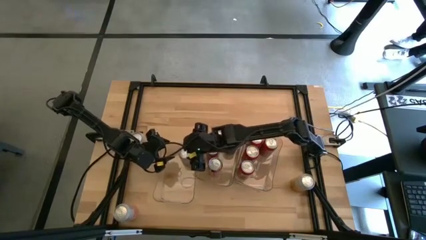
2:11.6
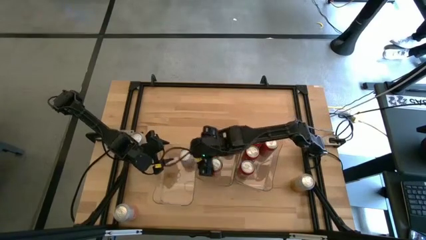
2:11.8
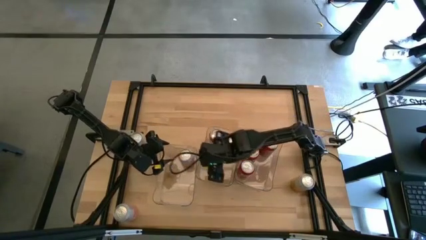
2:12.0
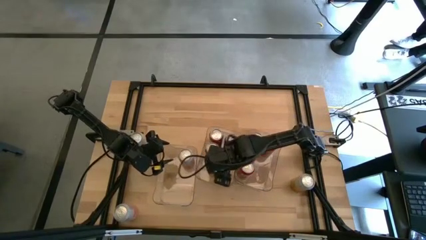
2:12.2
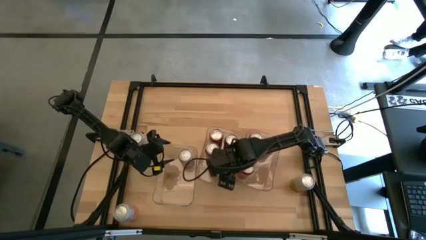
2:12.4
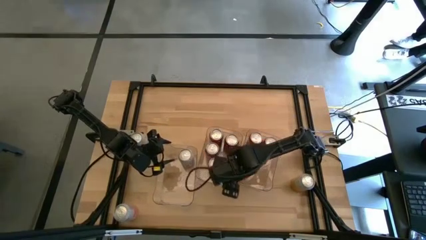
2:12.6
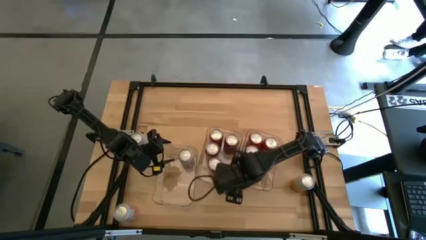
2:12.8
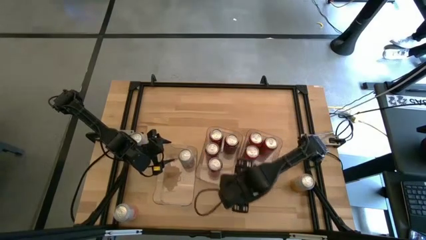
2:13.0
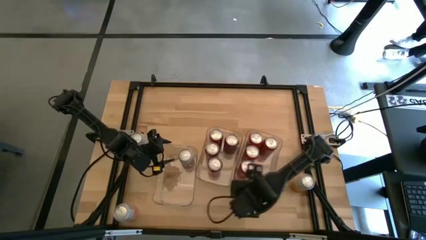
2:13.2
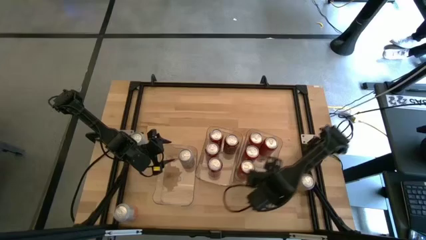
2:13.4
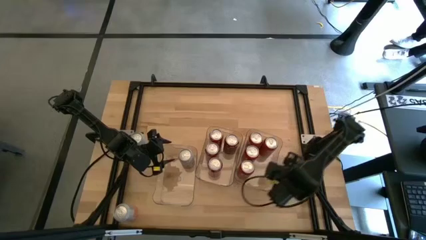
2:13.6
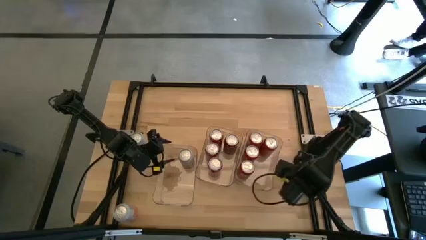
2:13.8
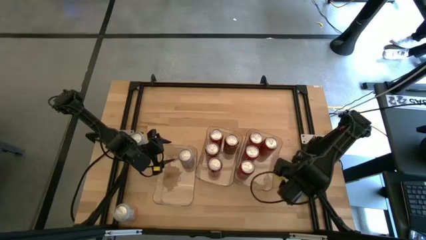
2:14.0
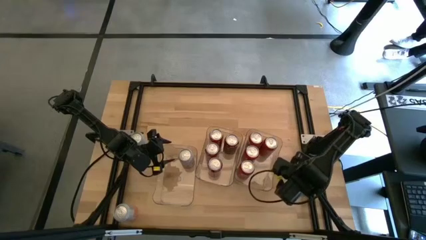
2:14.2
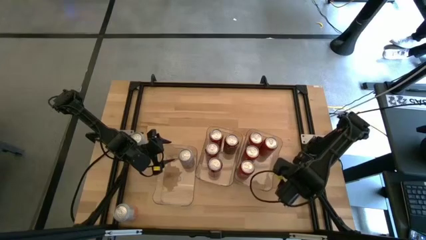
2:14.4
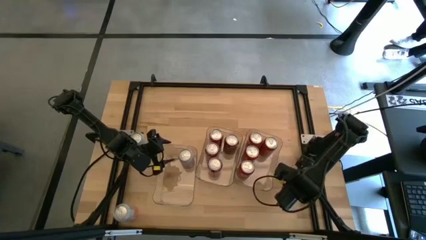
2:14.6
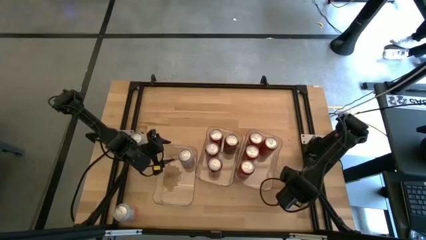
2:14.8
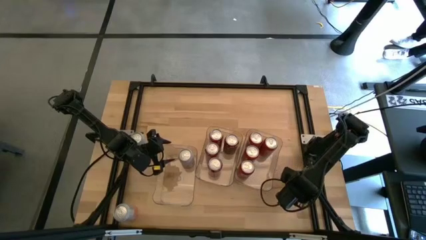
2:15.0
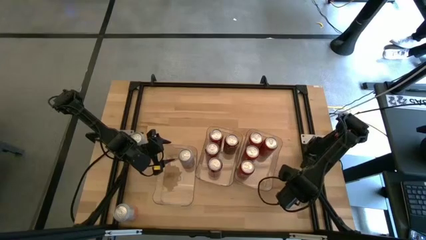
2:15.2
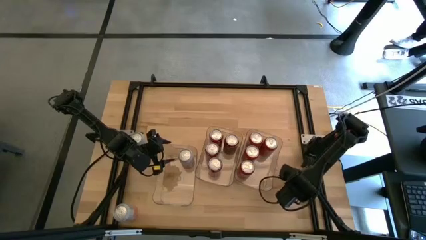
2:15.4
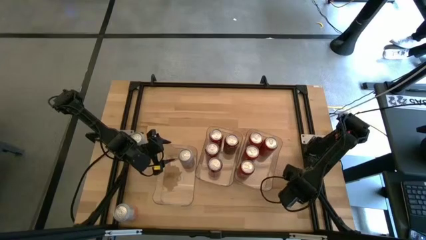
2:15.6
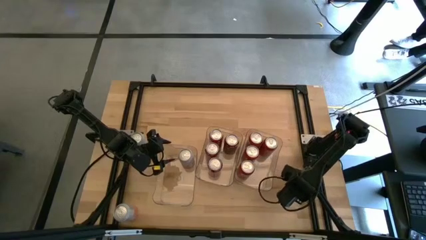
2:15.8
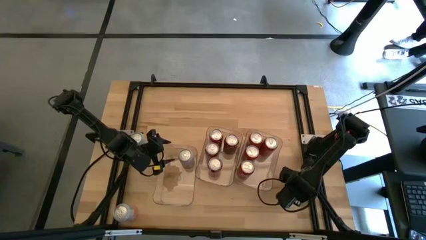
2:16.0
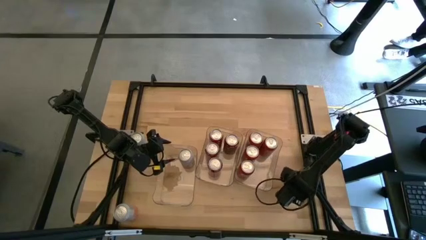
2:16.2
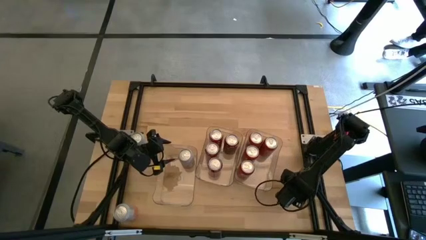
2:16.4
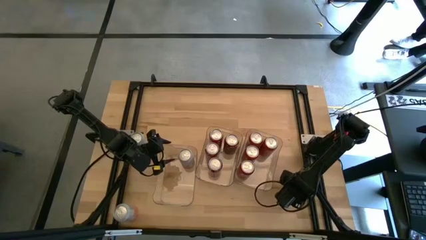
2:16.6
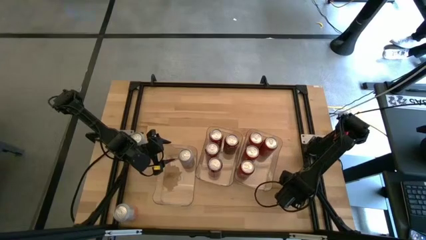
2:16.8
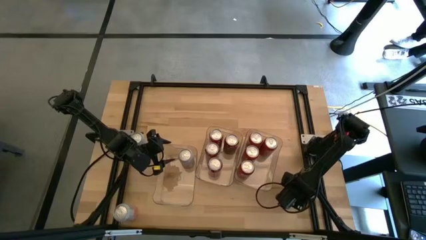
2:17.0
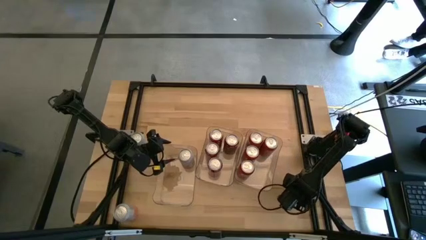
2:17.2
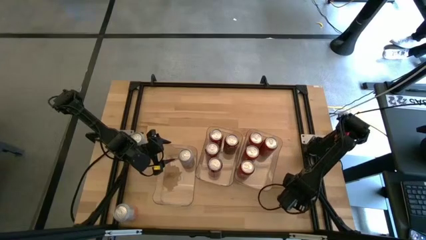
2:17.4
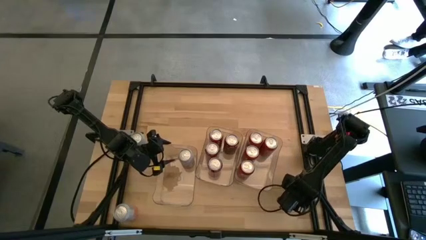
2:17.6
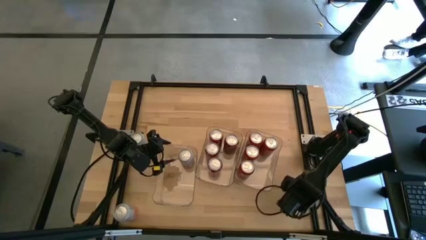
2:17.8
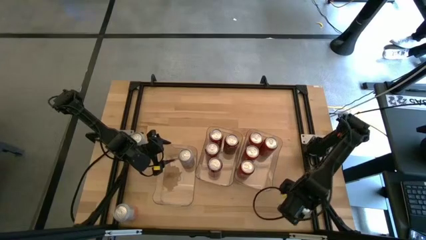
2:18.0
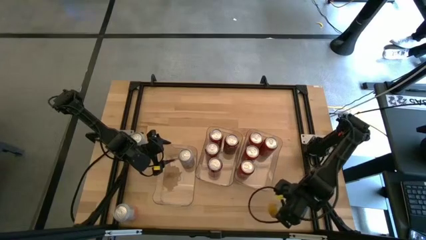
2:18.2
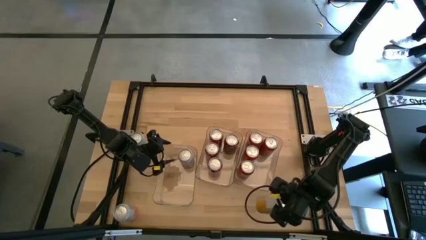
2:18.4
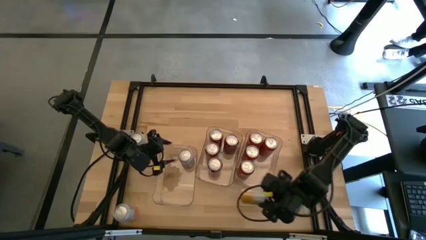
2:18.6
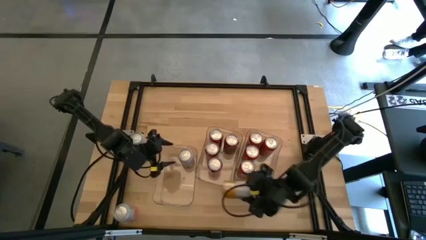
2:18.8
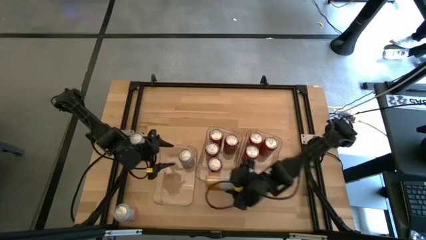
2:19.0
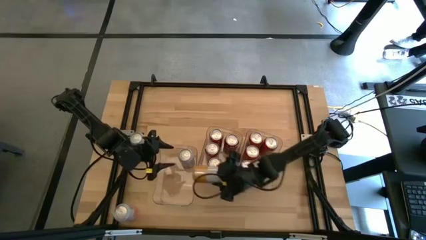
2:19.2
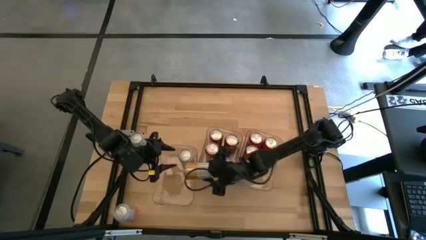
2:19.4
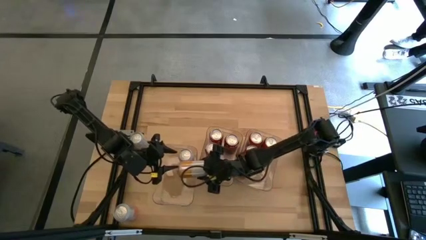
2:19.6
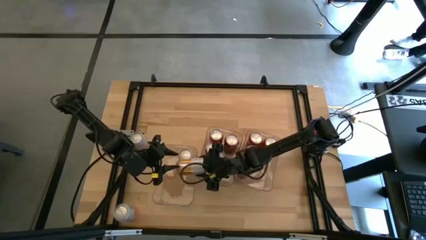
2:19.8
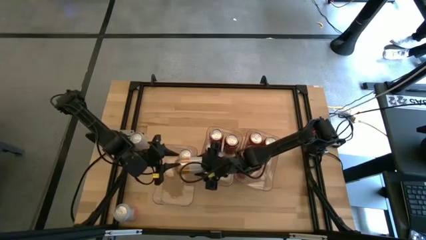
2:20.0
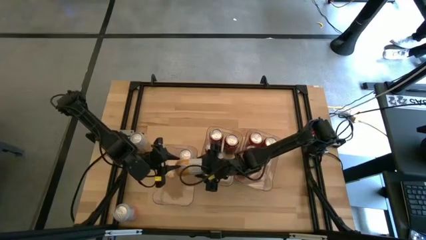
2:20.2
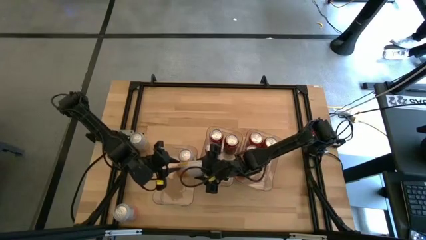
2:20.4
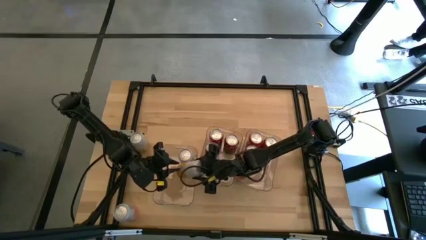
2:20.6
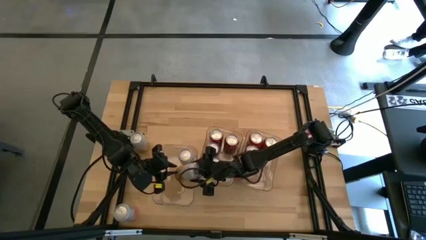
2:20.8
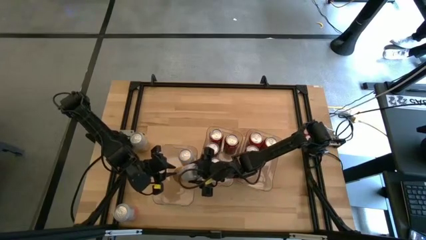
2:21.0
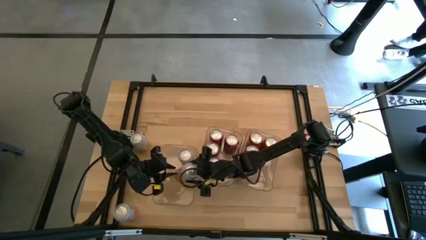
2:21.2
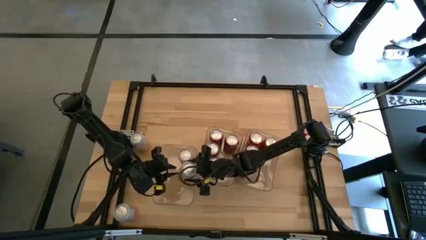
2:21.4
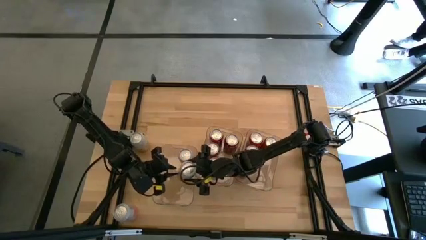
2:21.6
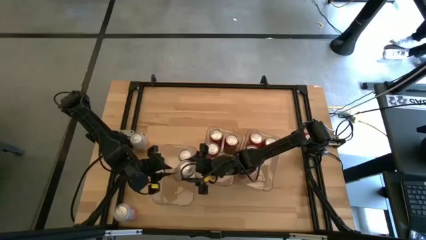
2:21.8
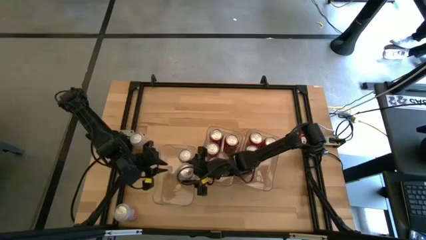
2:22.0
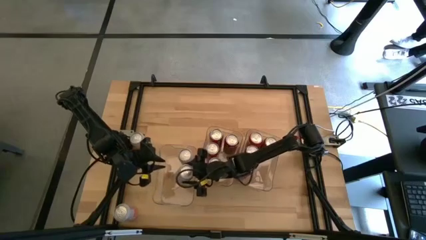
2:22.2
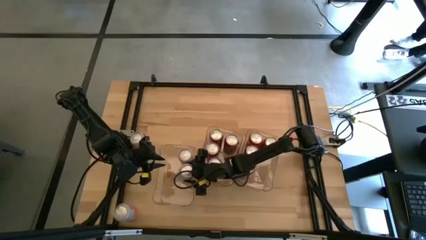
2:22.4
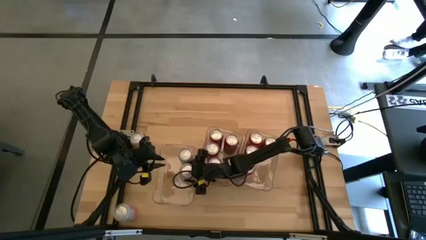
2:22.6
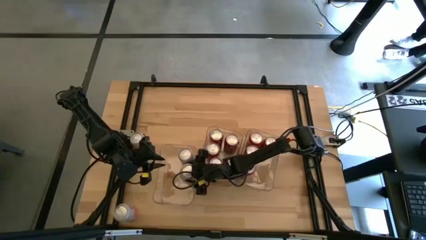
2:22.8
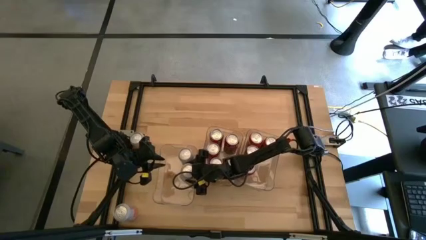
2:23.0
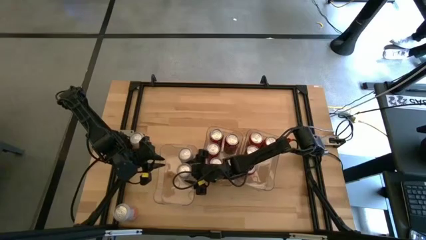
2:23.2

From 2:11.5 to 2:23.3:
Task: Sort soda cans
Put the bottom right orange white soda can into the left transparent bin

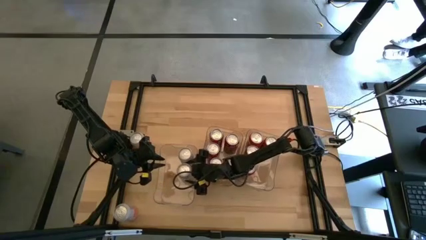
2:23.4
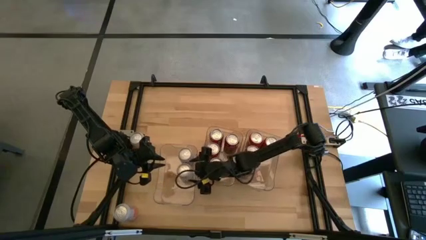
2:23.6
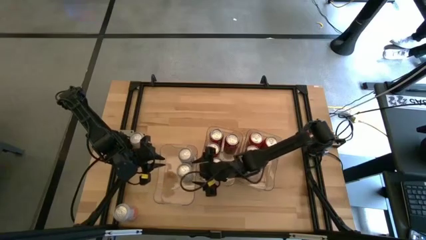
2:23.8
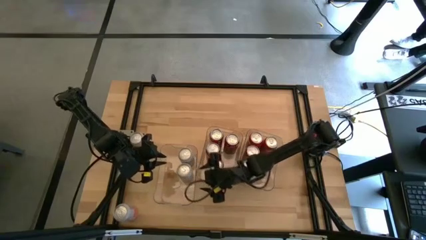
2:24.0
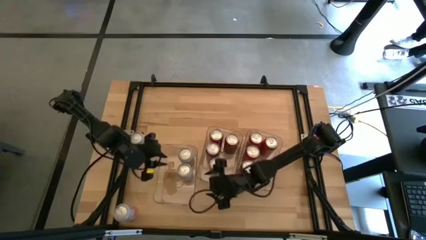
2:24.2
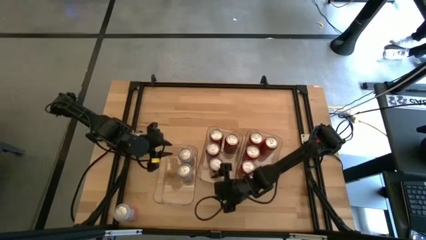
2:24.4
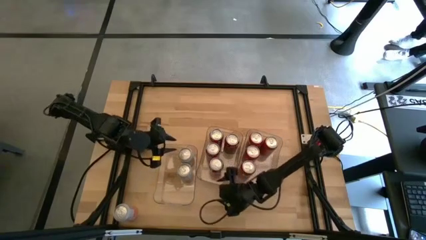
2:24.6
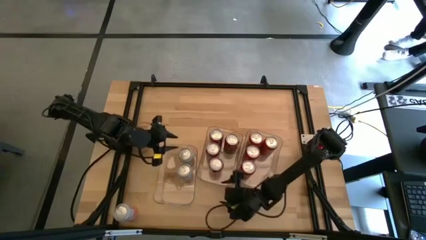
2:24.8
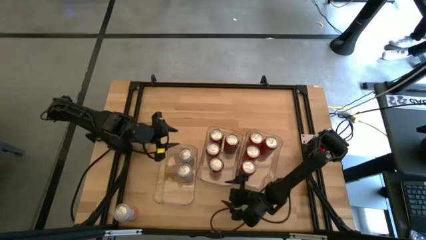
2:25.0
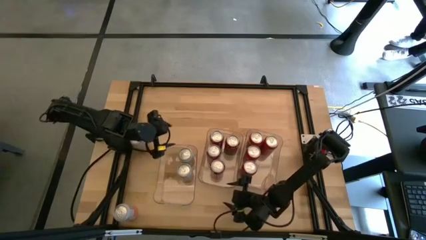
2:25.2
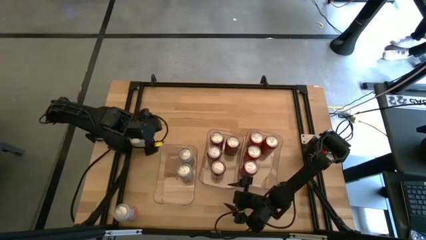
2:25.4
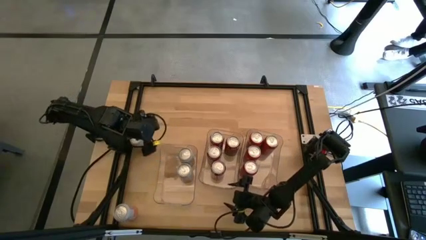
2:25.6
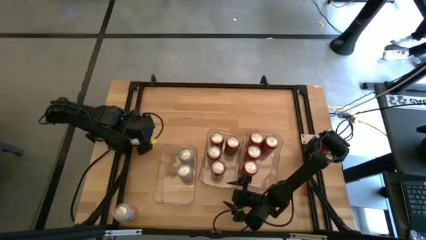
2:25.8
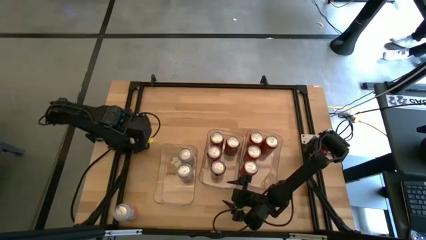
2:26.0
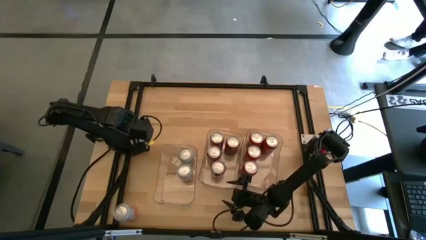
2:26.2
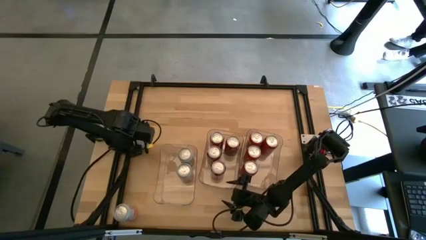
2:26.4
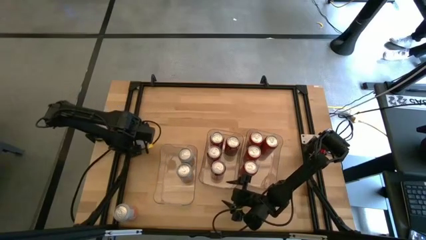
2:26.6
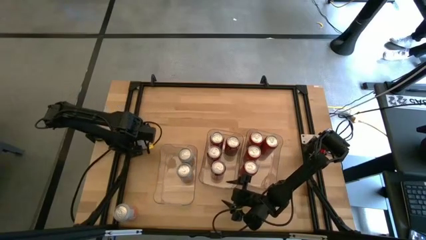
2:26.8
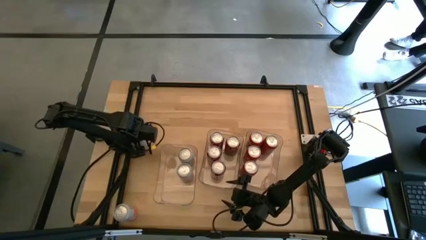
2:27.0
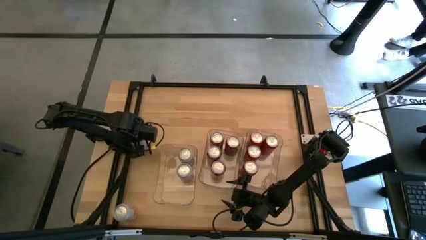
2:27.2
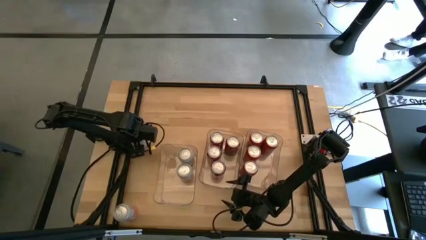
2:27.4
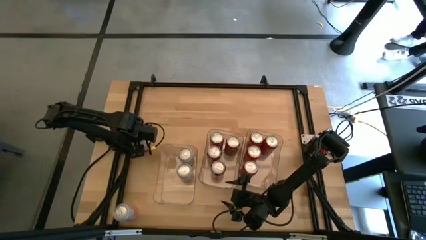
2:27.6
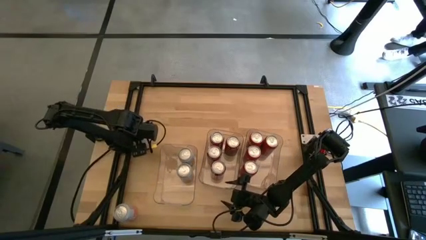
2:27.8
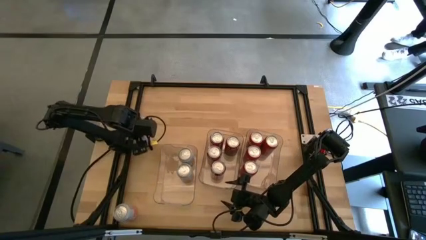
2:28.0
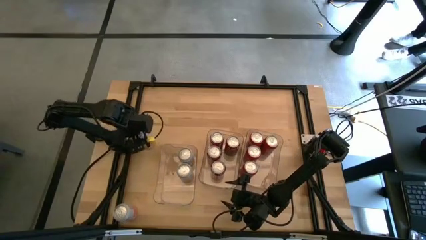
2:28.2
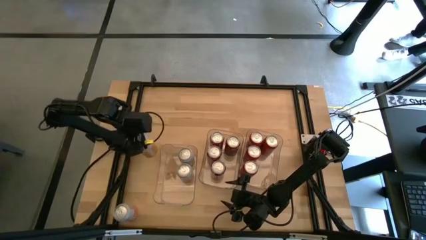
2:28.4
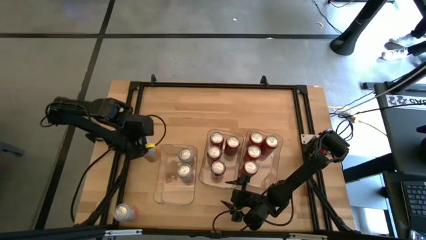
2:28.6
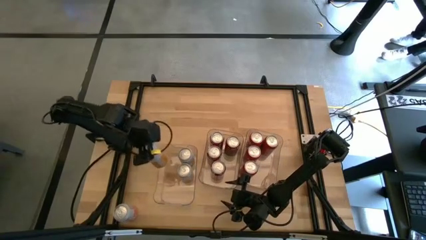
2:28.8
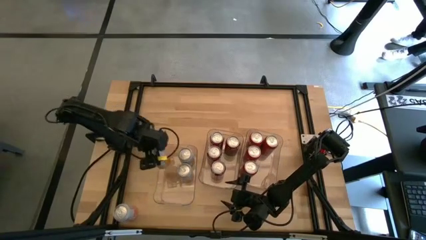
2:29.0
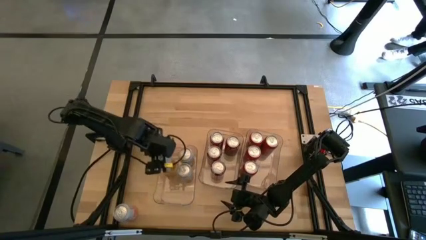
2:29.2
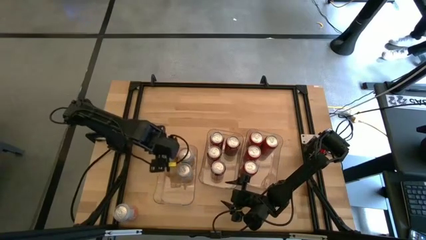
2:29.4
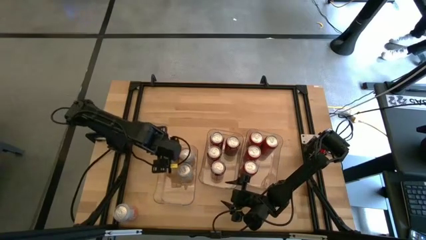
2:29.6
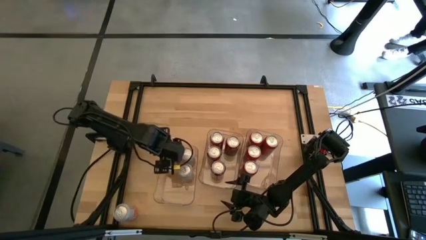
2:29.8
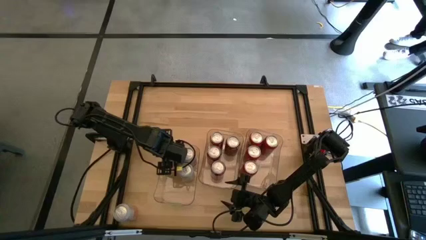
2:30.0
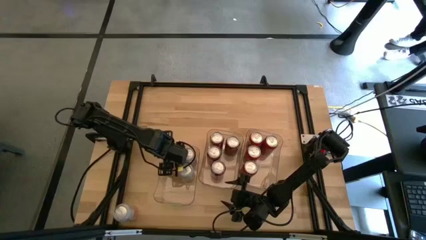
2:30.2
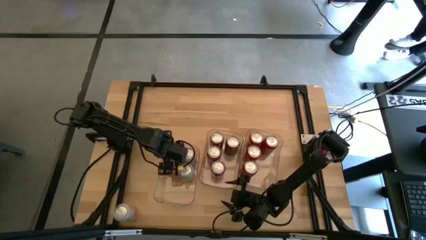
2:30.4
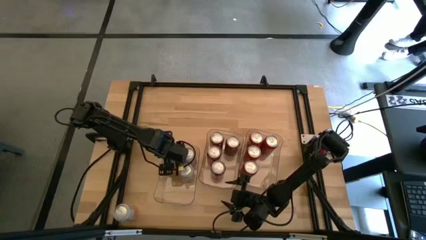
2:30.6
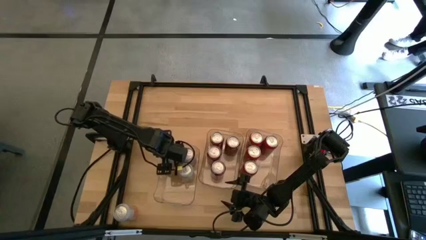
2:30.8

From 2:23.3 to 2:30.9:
Put the top orange white soda can into the left transparent bin
